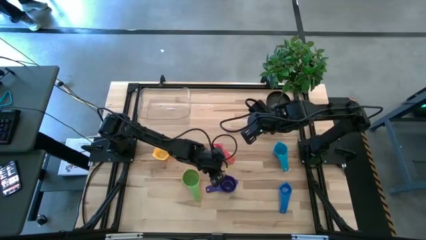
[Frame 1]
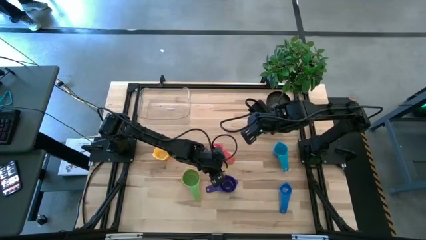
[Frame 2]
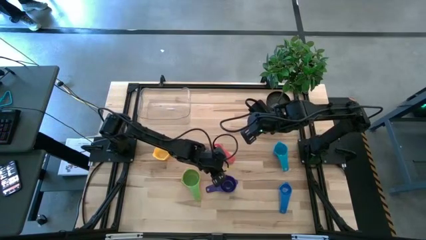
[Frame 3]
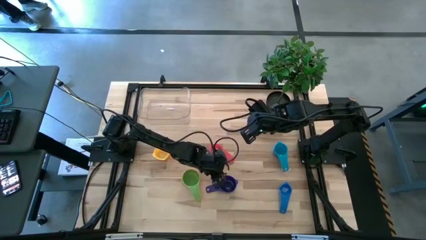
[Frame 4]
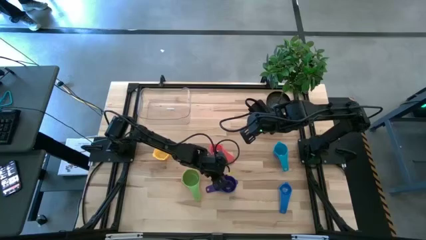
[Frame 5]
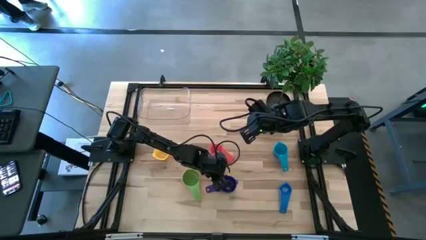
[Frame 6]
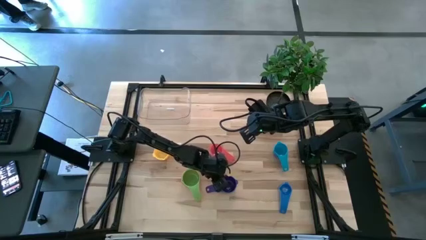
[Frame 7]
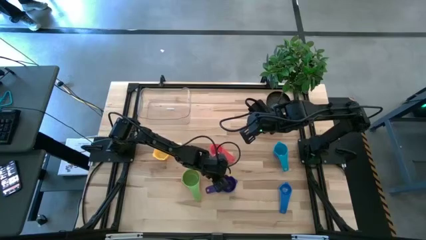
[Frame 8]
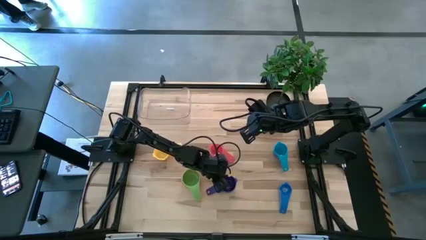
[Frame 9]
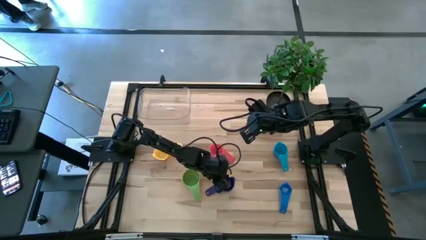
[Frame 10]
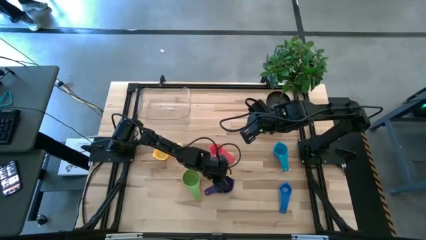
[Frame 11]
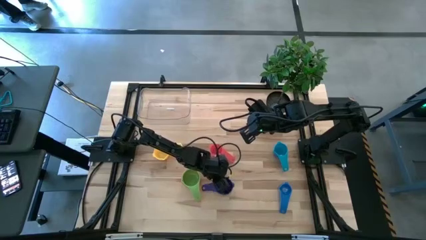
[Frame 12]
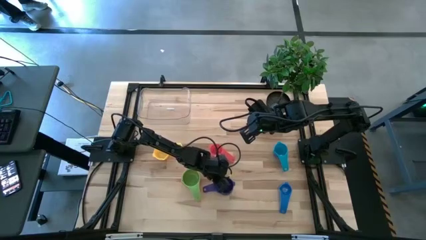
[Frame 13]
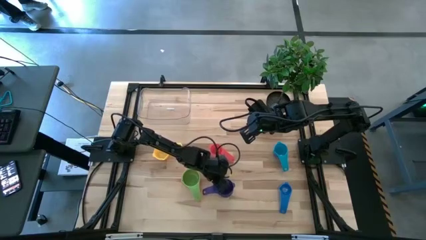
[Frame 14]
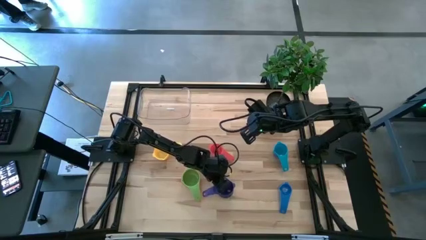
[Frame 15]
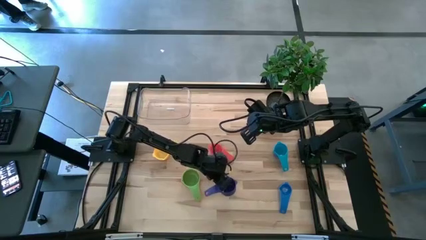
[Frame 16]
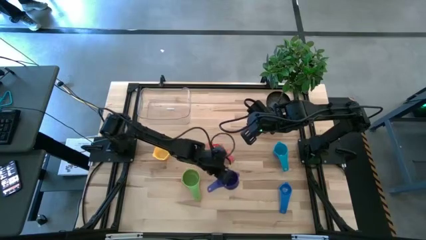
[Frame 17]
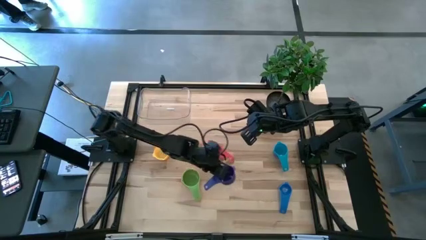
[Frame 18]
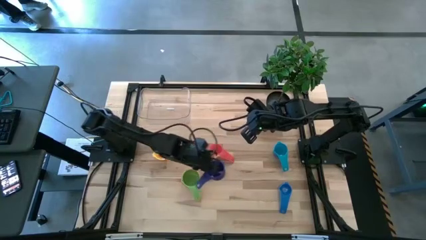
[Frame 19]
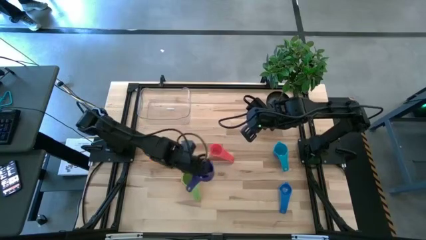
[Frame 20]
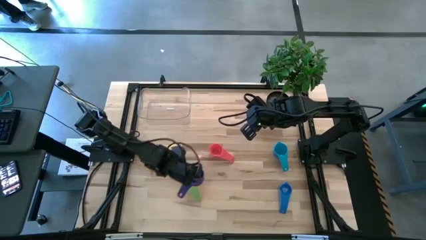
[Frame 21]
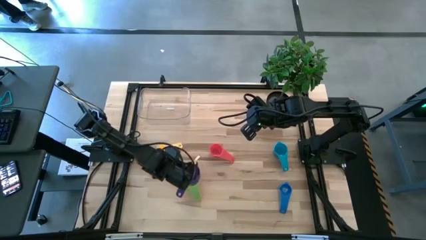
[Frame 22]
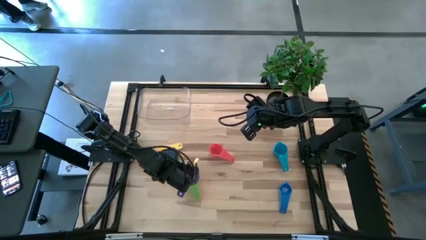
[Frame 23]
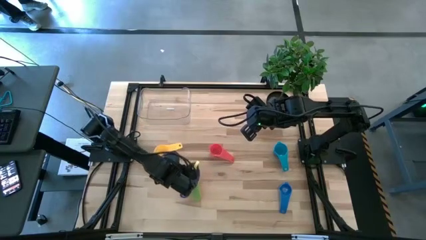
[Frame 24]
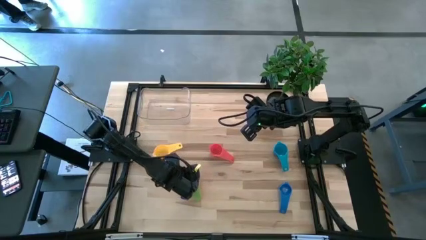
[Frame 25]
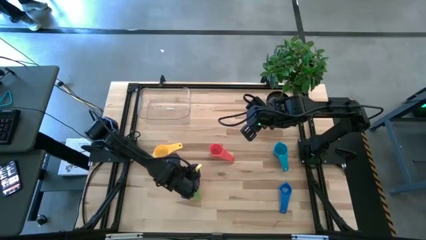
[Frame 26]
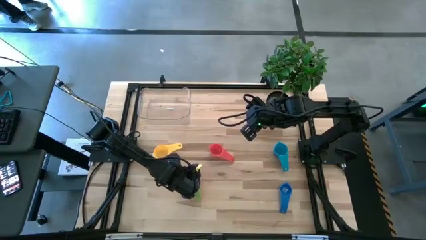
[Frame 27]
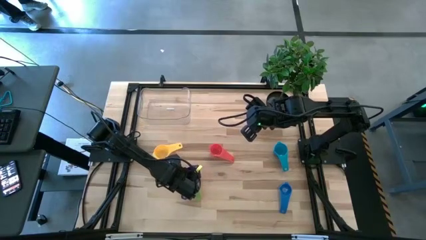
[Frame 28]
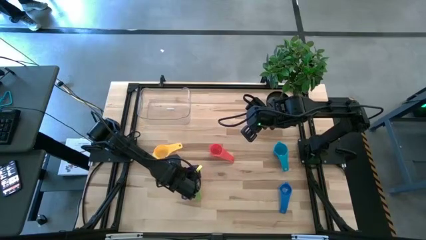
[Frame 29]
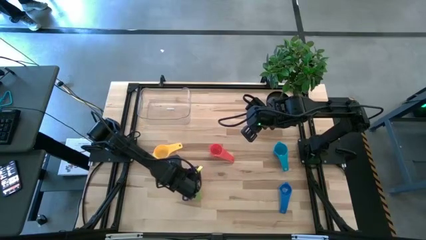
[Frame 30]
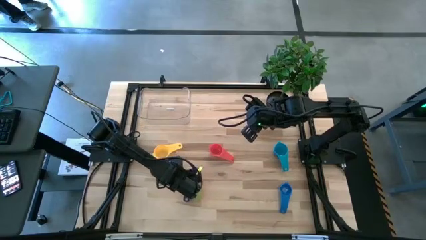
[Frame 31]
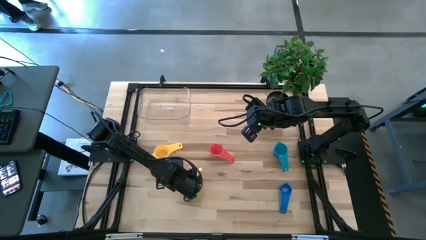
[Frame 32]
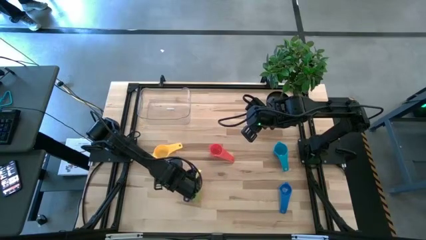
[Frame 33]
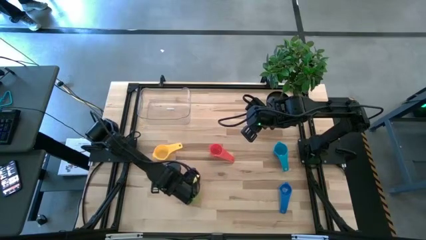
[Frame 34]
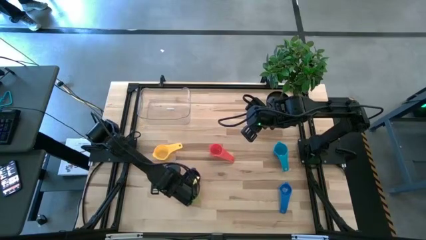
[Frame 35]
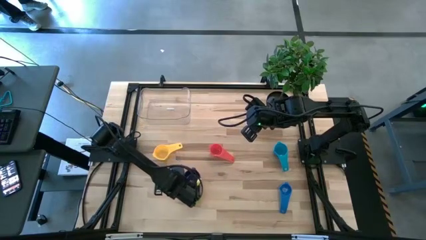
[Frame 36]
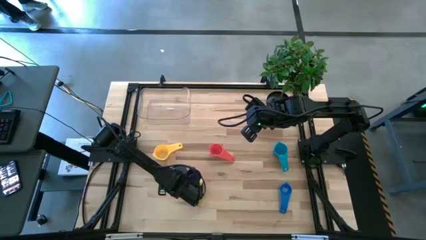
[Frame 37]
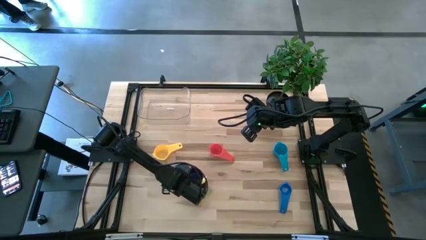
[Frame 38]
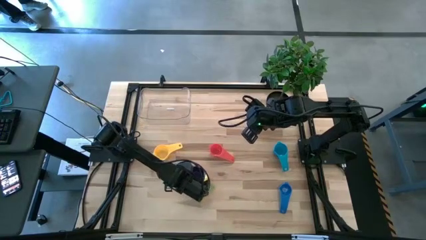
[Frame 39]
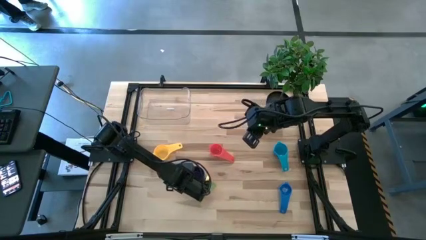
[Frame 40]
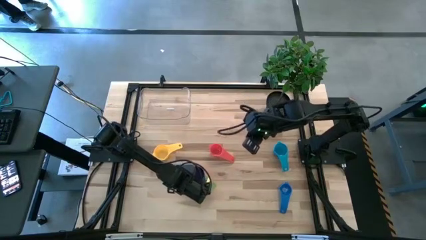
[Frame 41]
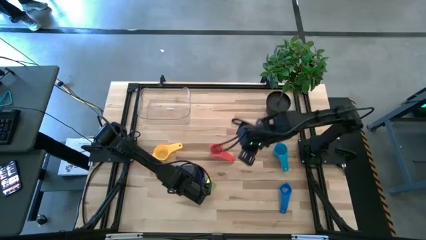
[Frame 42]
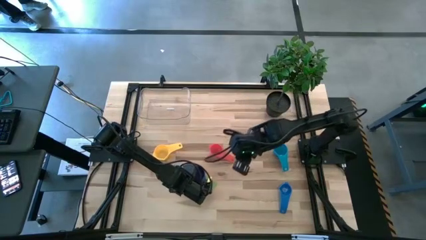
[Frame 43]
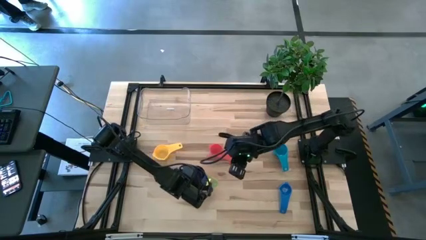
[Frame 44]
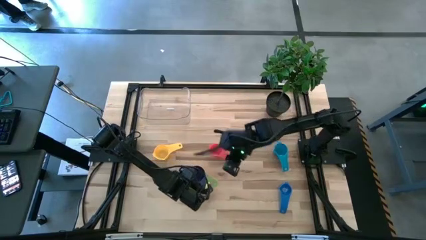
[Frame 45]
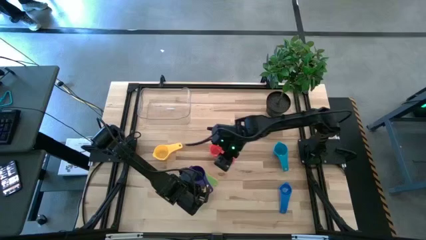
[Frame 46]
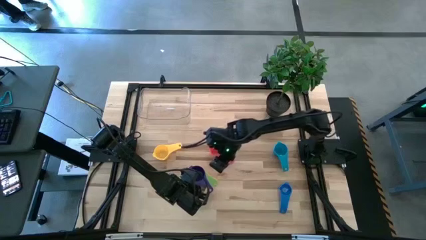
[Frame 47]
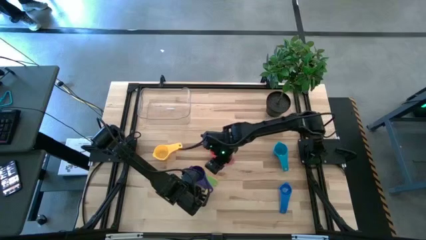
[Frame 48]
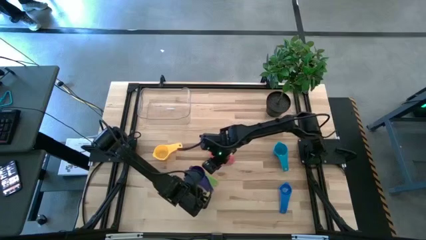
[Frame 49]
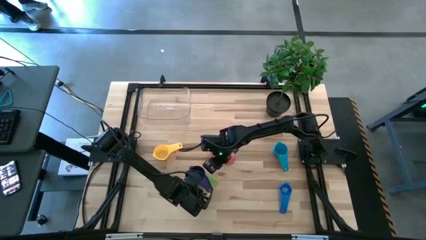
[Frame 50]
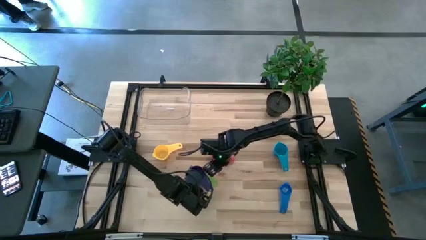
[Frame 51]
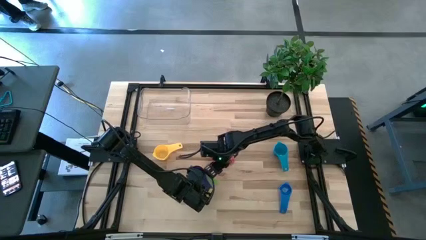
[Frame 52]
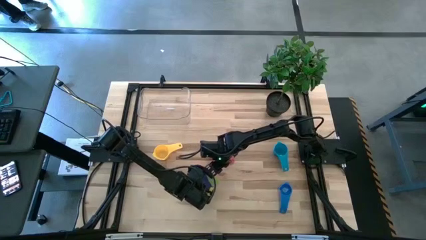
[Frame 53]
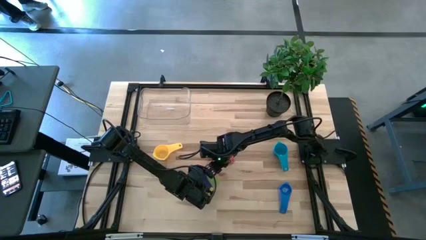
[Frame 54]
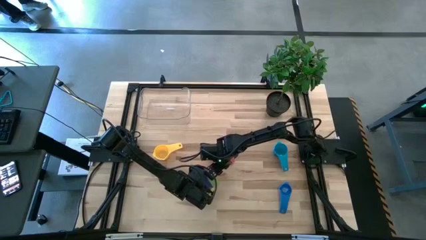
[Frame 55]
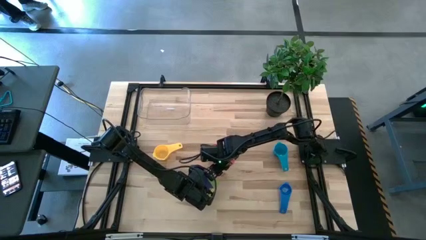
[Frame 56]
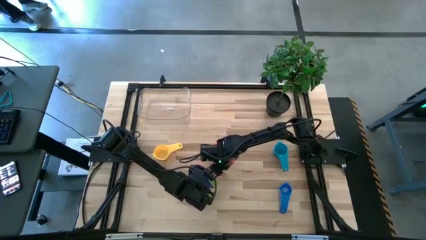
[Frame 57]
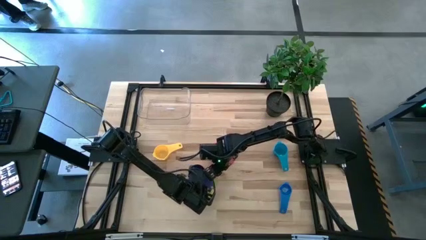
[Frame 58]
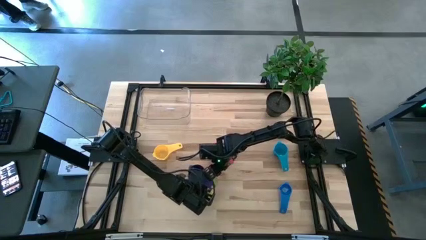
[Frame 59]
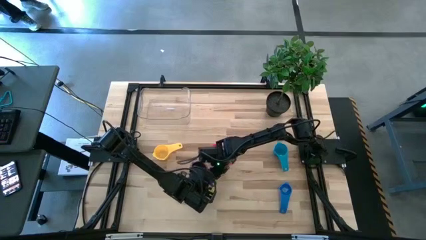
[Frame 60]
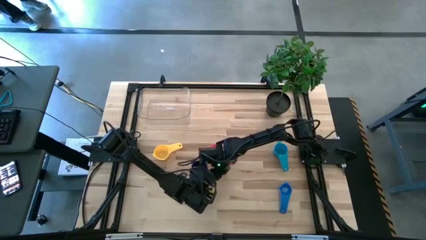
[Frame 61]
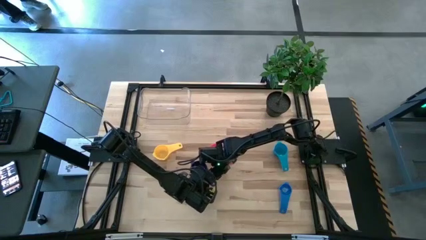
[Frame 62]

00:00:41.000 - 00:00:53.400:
Task: Nest measuring cups in basket
Stack the violet measuring cup on top of the green measuring cup

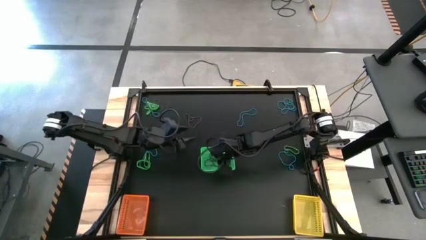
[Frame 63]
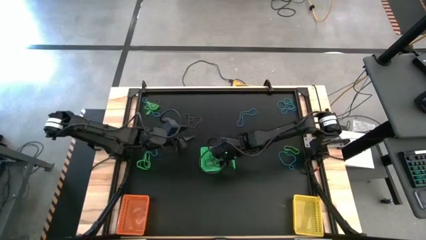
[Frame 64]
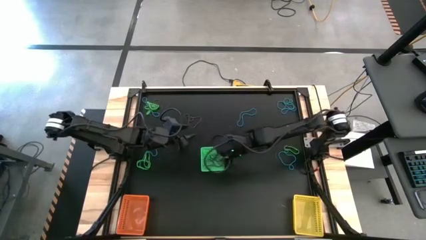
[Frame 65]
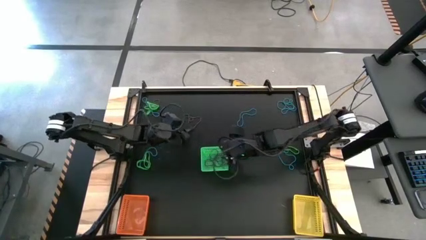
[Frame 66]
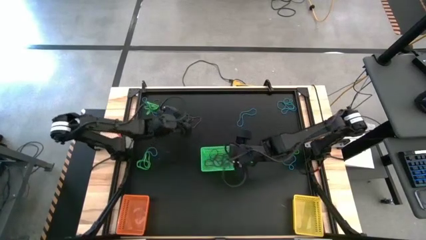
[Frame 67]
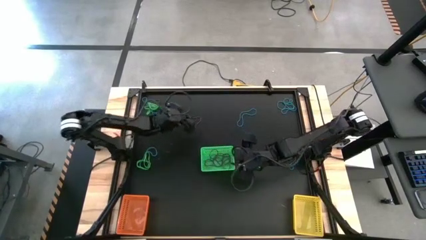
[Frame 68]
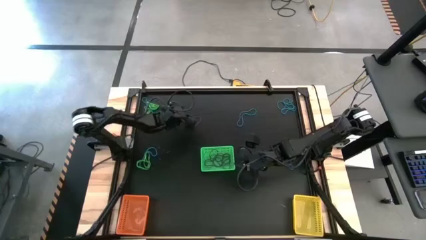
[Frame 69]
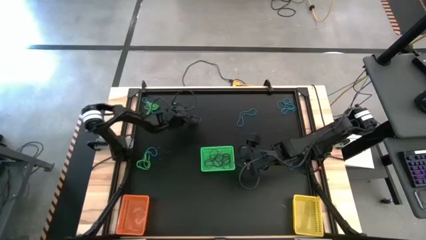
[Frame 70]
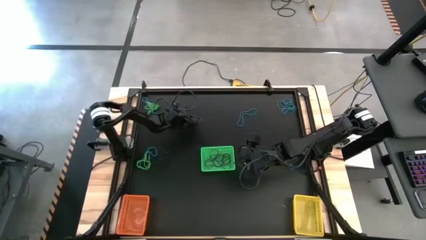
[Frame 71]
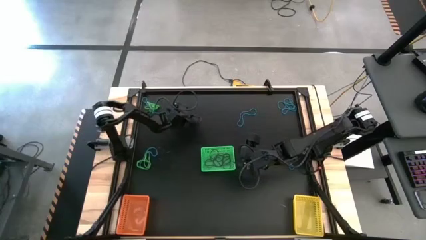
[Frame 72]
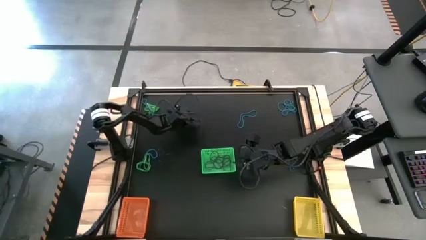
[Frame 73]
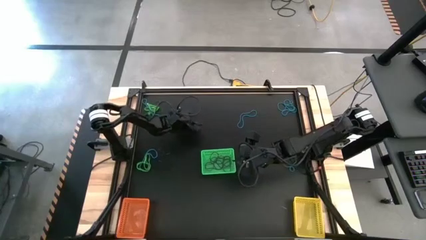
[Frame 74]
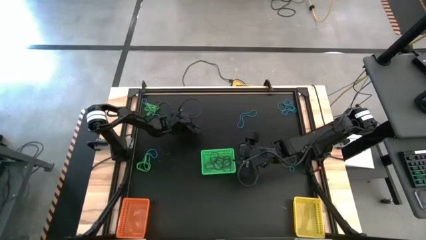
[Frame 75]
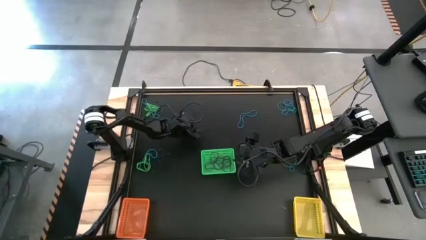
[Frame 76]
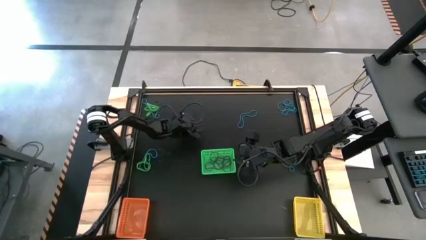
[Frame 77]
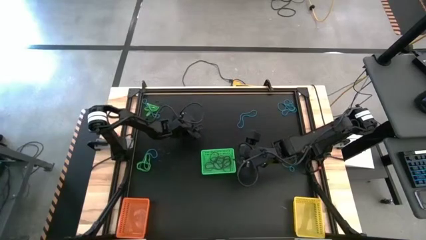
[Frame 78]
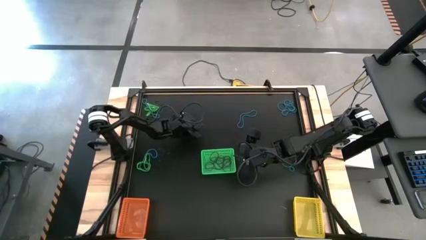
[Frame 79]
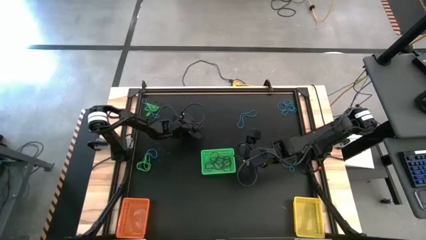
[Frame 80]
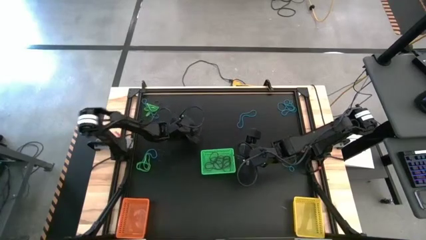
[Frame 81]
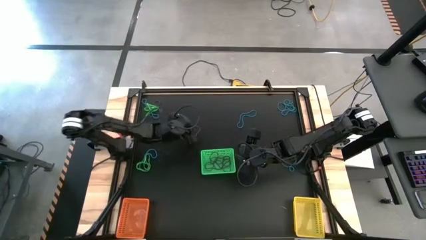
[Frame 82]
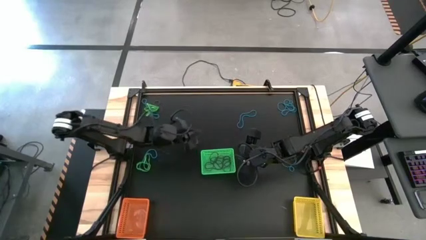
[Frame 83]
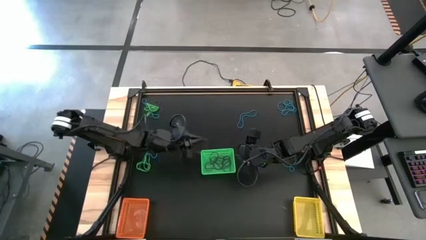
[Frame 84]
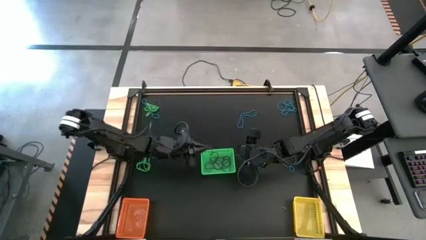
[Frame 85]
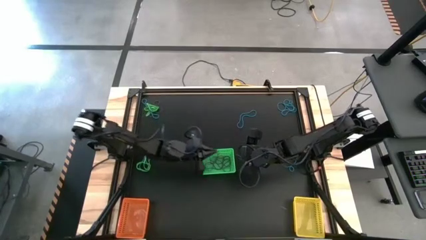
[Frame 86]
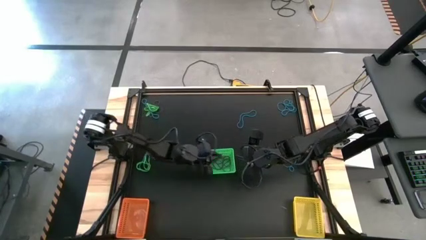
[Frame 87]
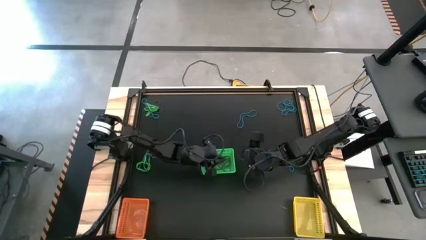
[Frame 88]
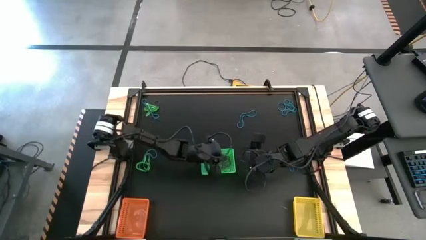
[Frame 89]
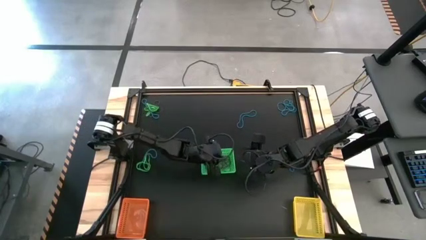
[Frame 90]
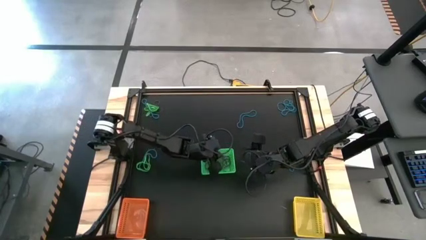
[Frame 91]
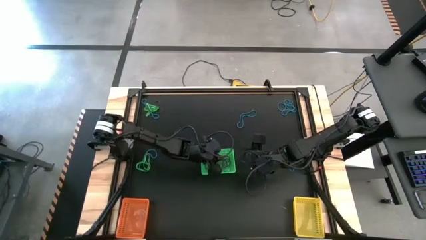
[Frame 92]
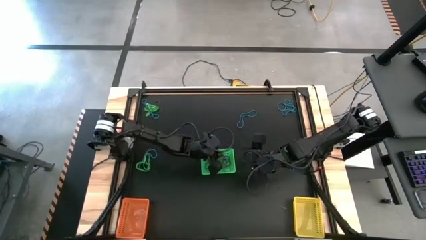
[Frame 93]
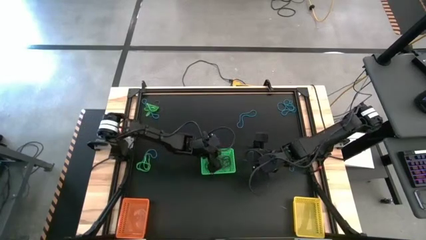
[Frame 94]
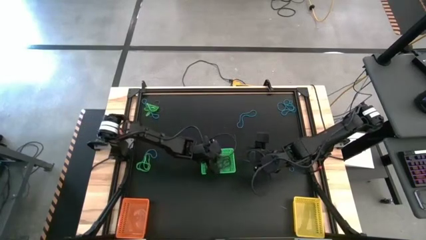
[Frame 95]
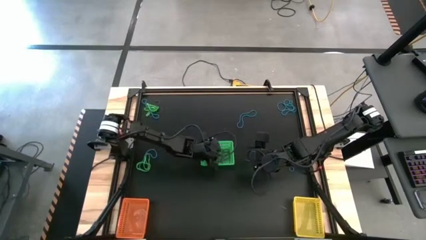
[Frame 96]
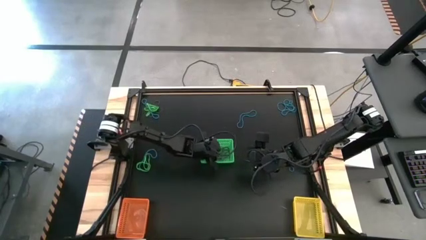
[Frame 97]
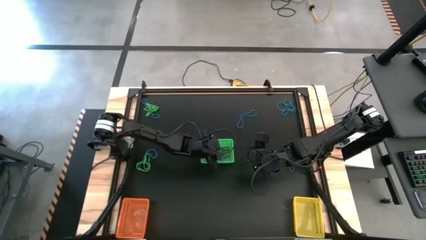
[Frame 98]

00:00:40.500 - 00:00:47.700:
Task: Sort rubber bands into baskets
Put the violet rubber band into the green basket
